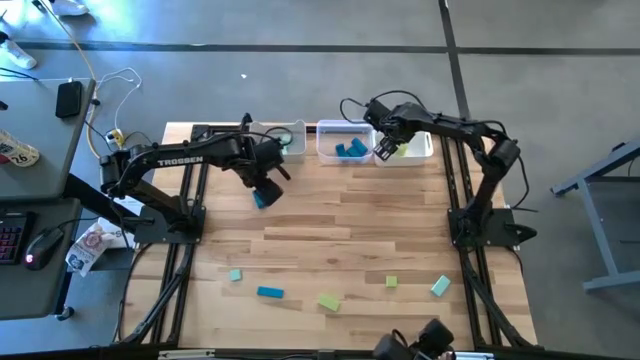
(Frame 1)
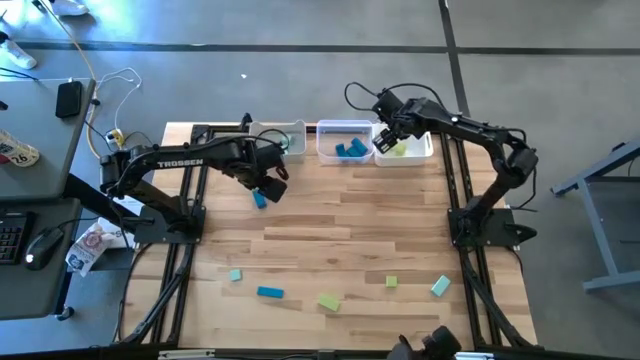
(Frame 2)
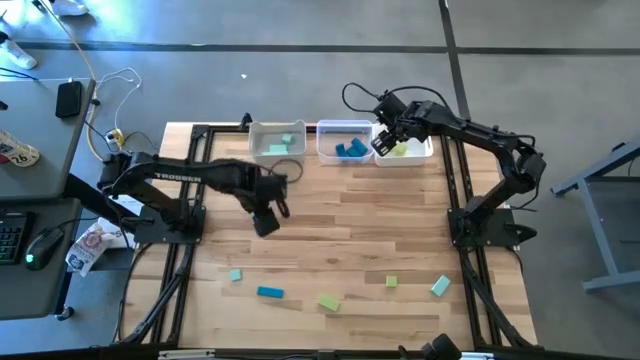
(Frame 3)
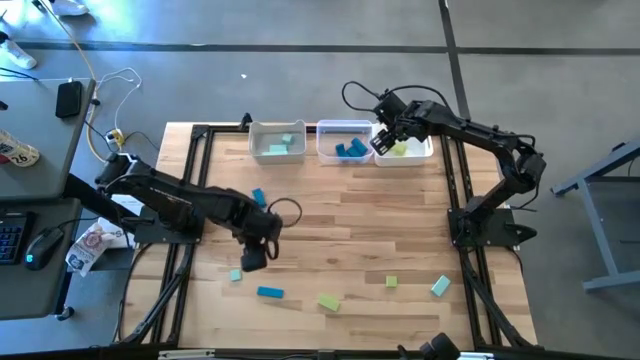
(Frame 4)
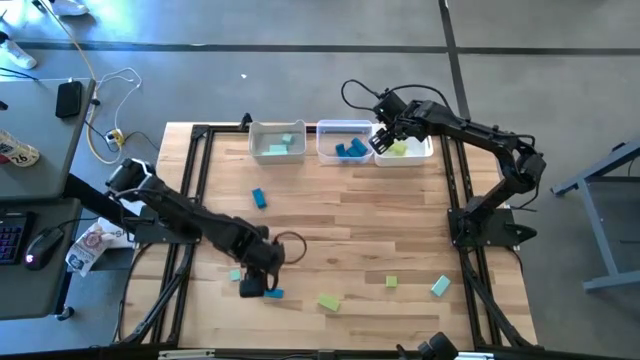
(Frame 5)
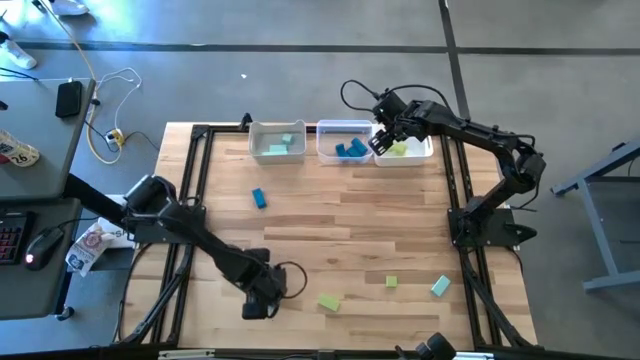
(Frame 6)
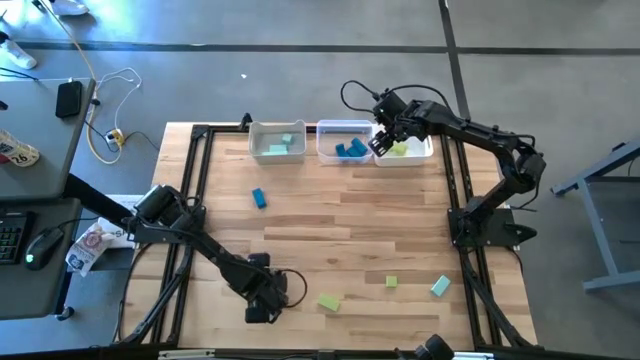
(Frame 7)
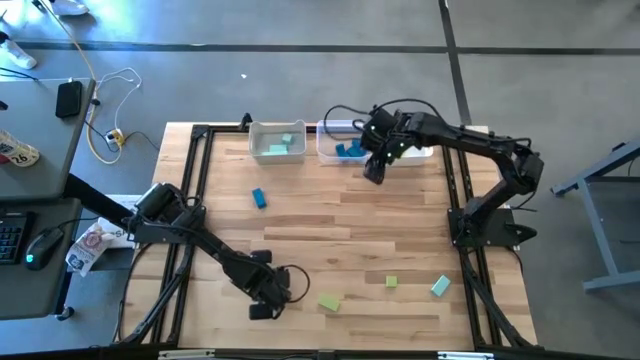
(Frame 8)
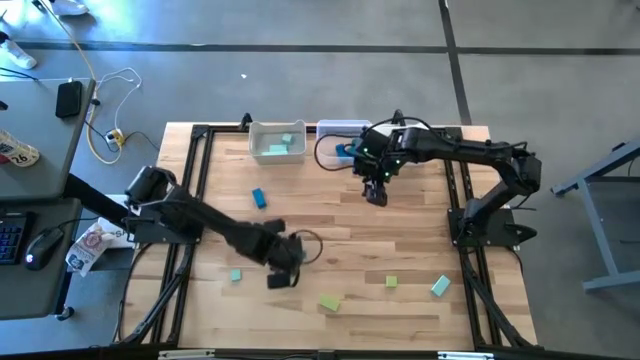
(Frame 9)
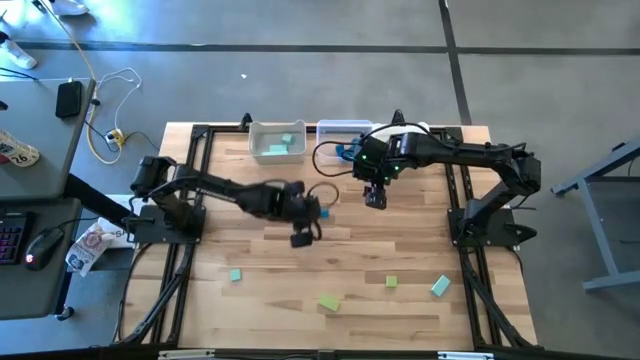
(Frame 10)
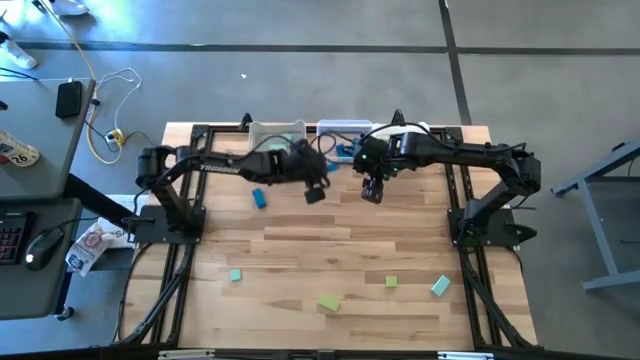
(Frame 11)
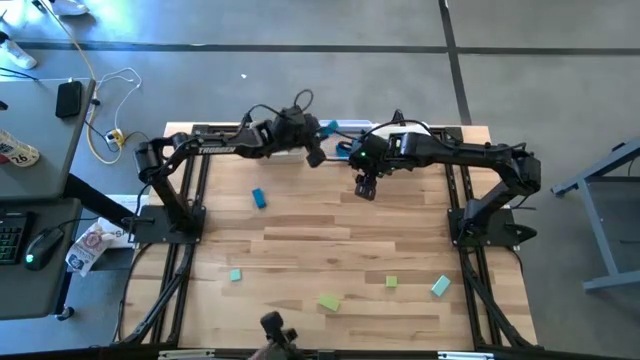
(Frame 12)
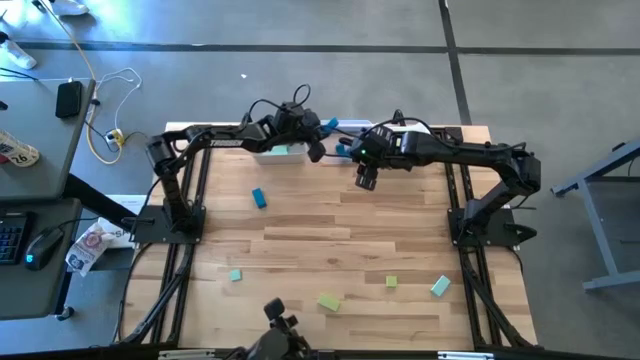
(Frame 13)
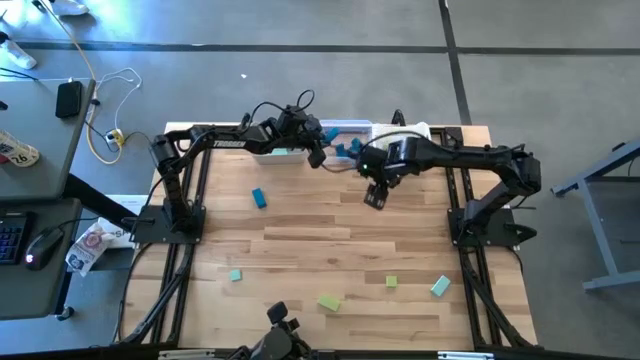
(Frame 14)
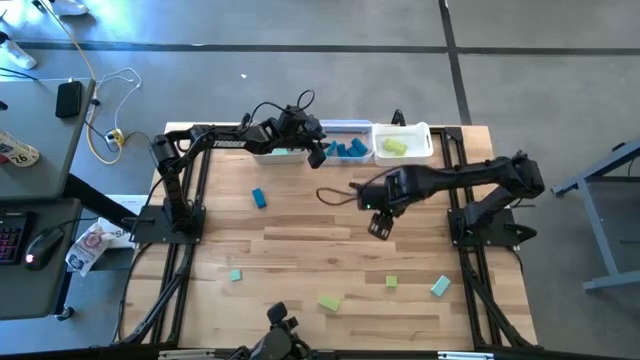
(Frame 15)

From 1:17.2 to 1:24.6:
Task: Sort & place blocks by color
Put the blue block into the transparent bin

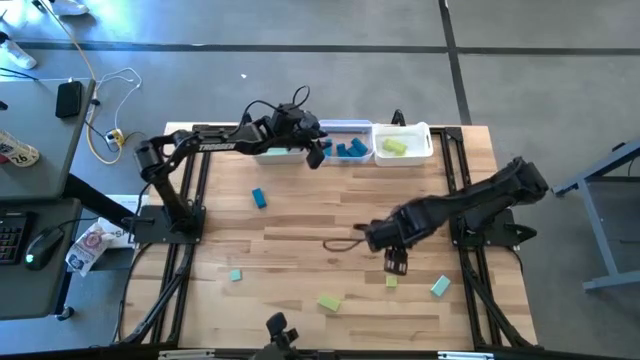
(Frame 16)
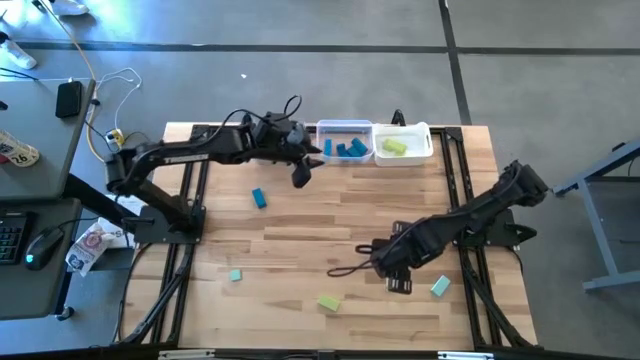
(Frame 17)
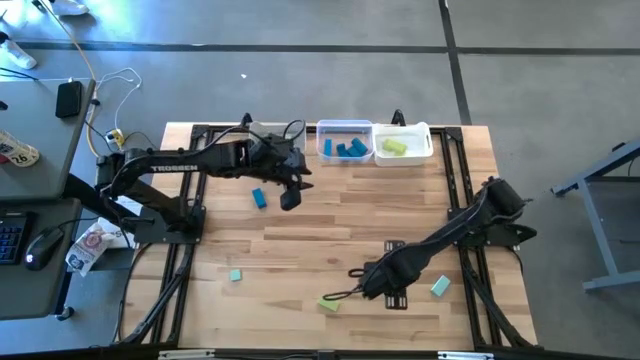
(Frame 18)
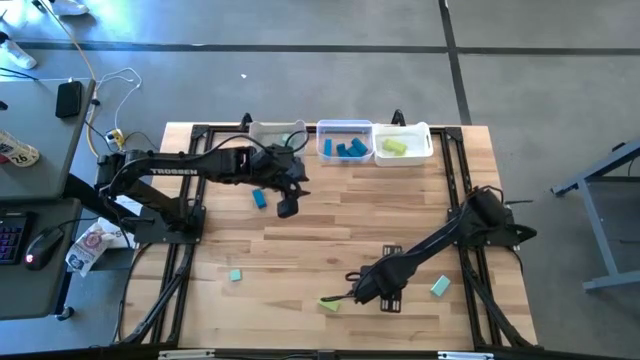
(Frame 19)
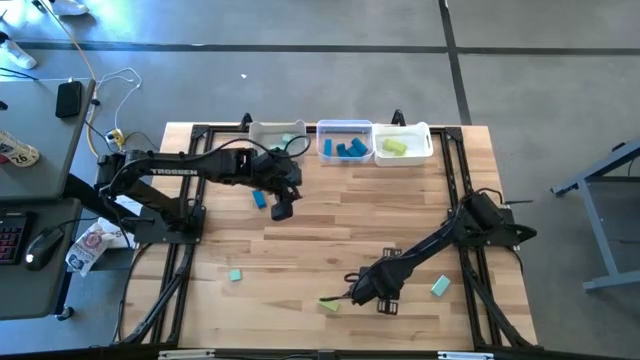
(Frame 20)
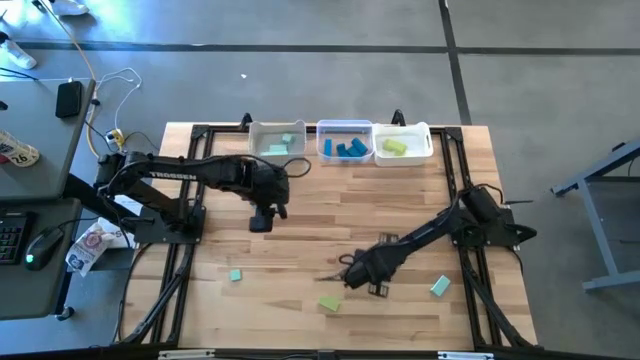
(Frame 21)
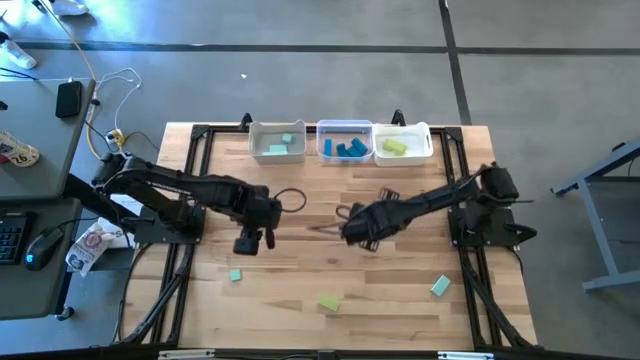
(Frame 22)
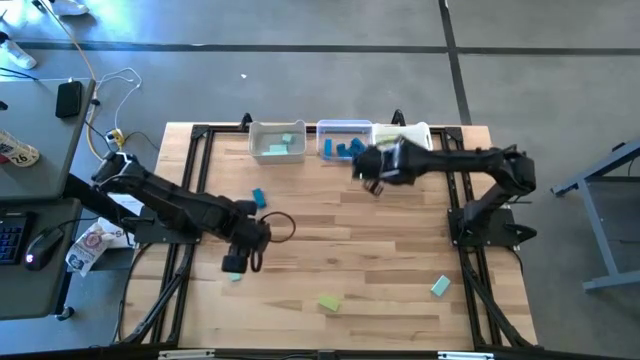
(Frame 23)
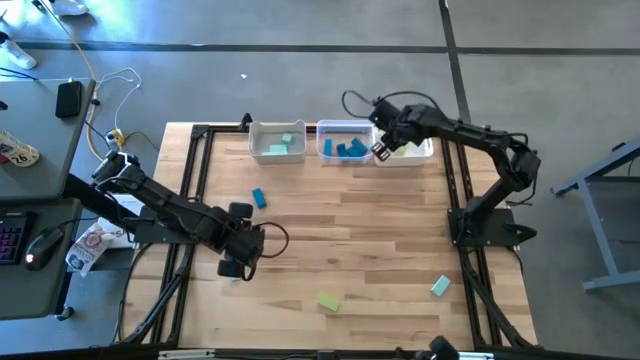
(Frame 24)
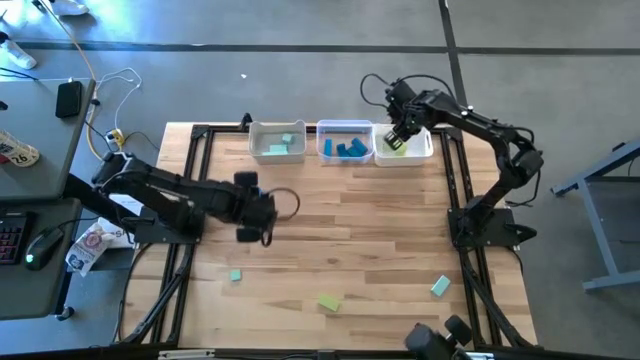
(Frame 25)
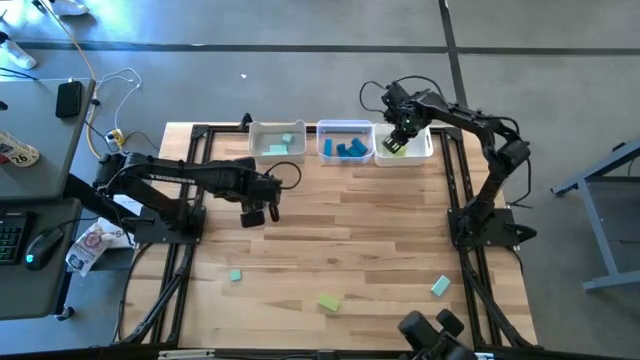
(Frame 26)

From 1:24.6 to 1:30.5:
Put the green block into the white bin

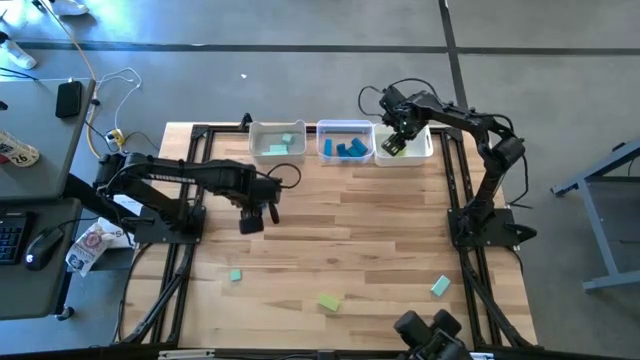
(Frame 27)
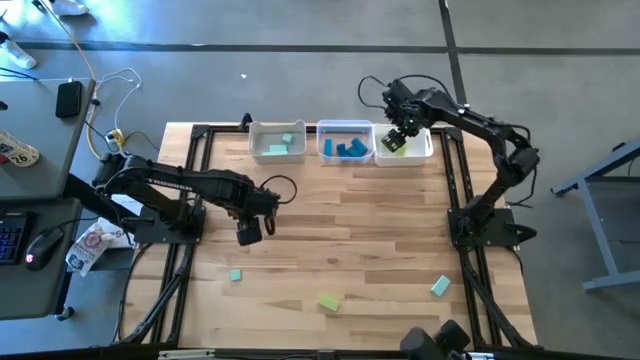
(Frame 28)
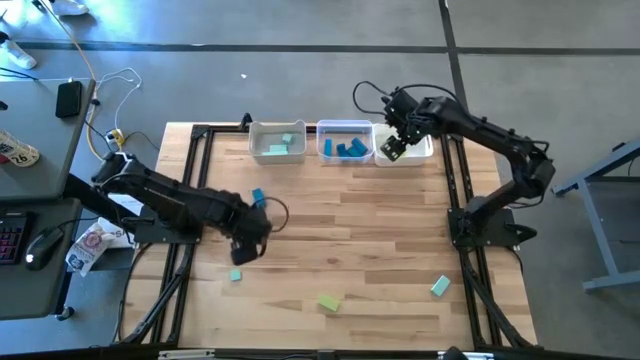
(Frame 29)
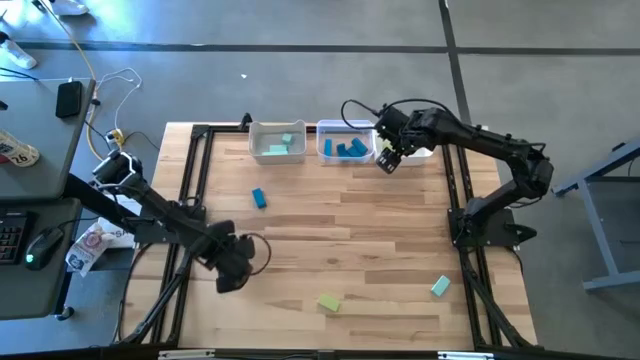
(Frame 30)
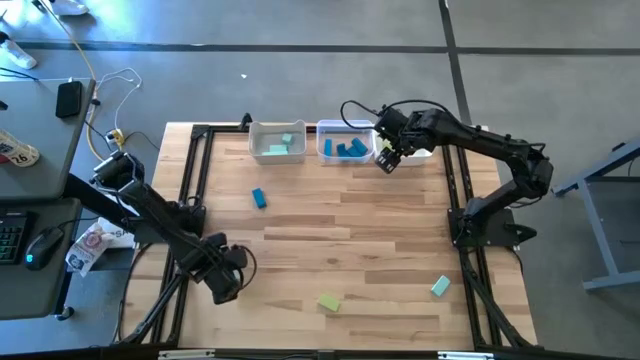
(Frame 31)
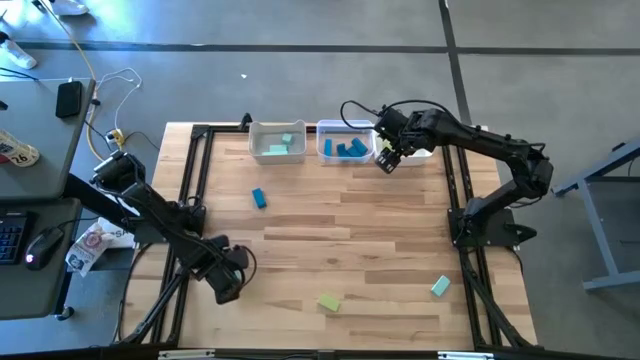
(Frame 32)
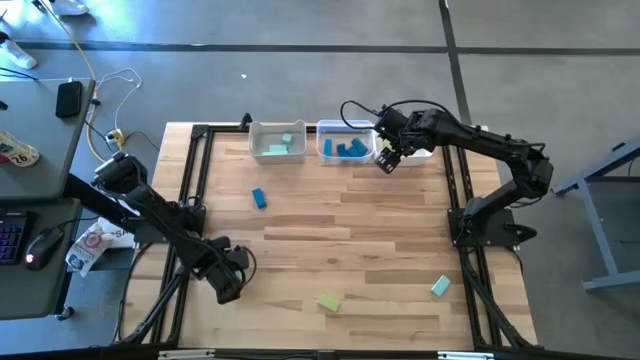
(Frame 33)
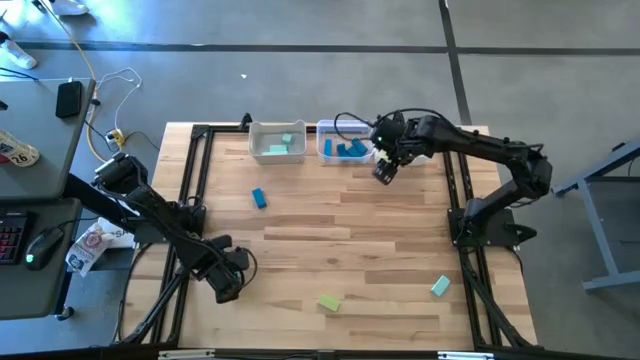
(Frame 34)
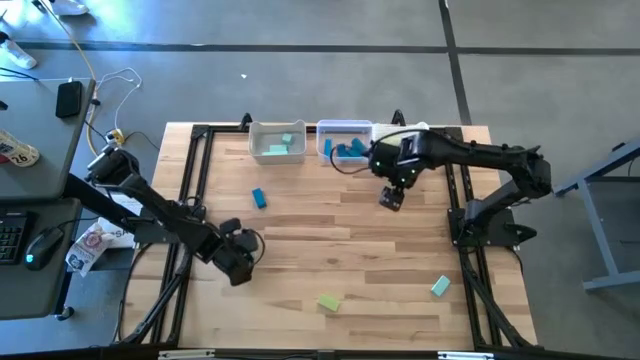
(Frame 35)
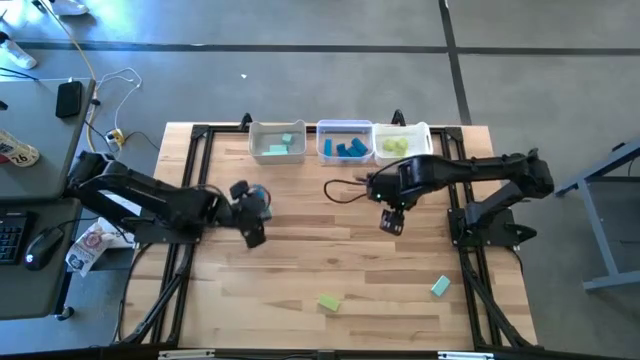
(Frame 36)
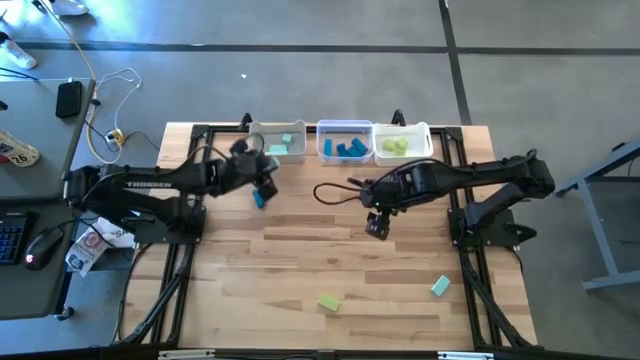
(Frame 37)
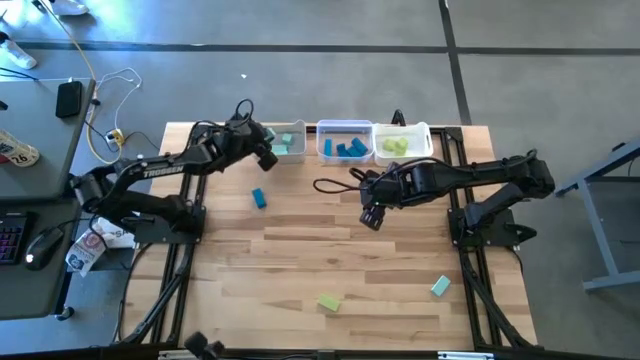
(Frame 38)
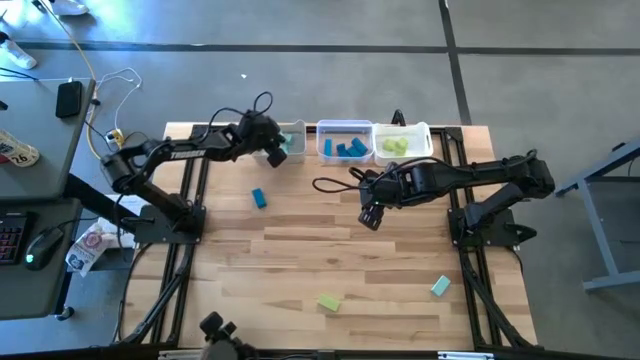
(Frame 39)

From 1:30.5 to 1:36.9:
Put the light blue block into the gray bin

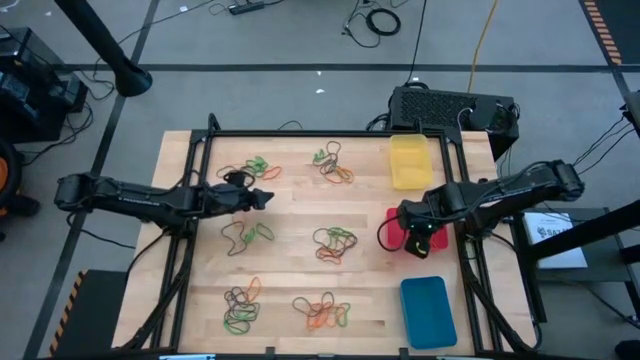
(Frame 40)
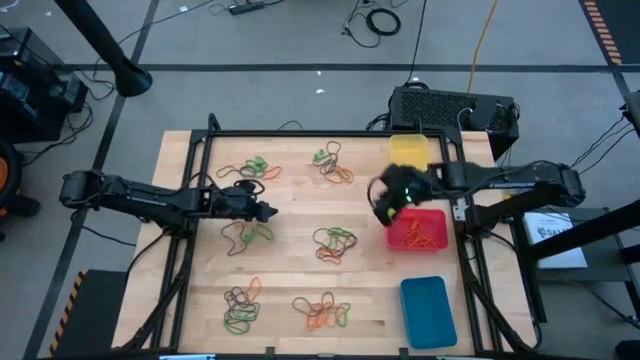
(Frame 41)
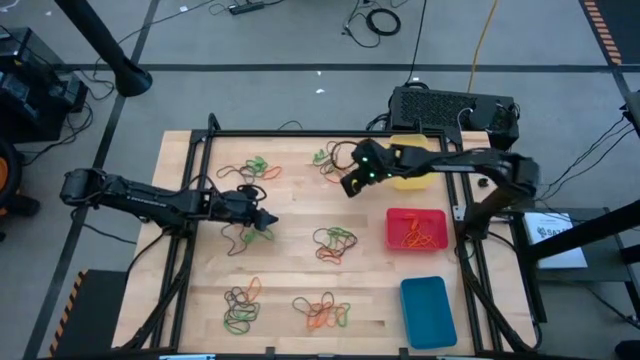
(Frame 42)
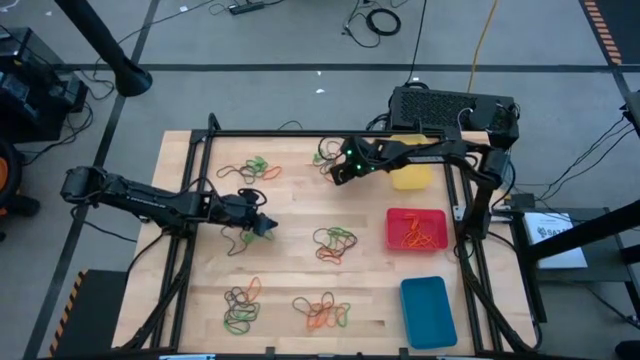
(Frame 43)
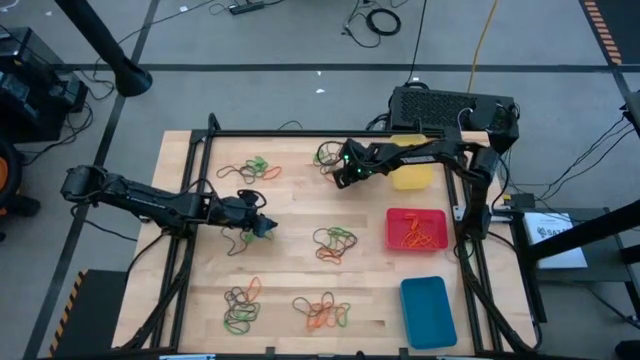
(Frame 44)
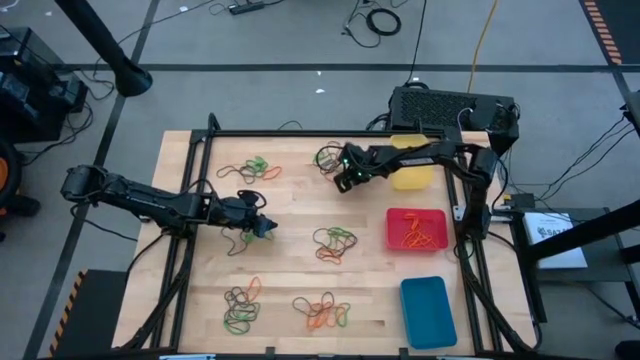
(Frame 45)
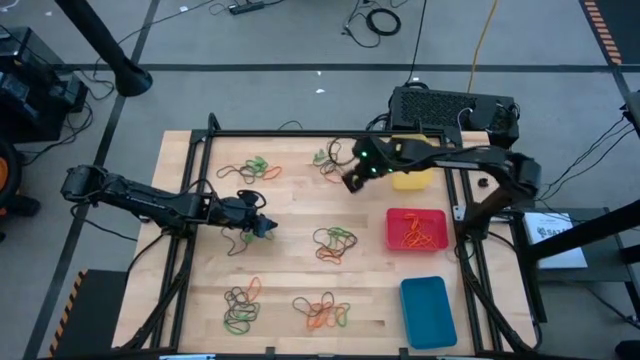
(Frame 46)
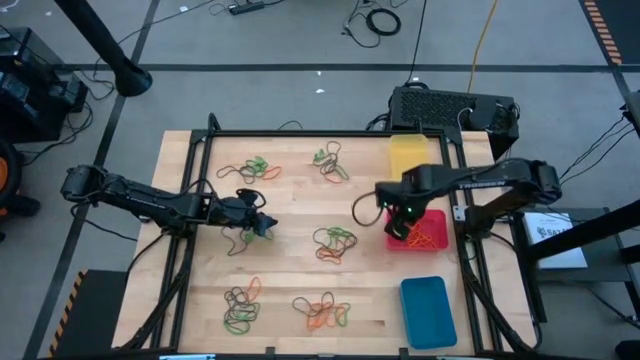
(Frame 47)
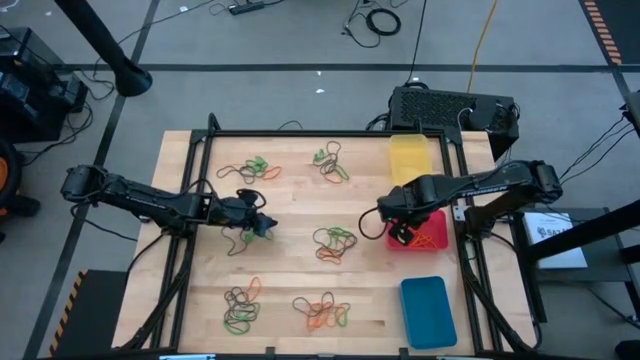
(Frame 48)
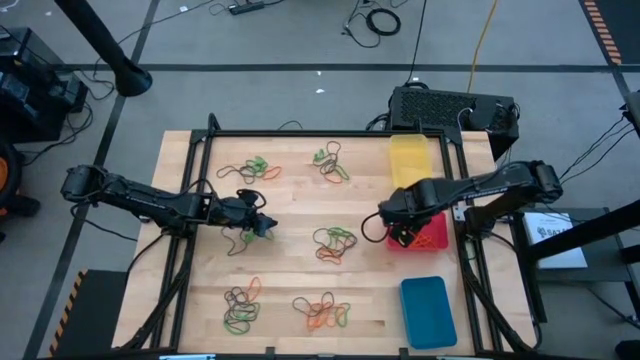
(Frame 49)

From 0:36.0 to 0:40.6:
Task: Sort rubber bands into baskets
Put the orange rubber band into the red bin
